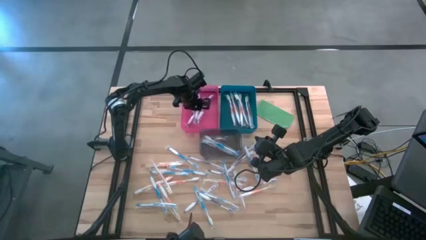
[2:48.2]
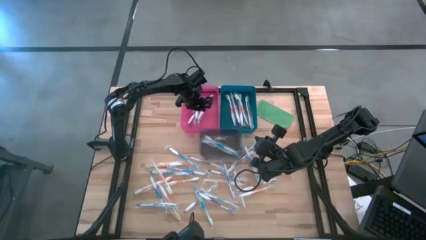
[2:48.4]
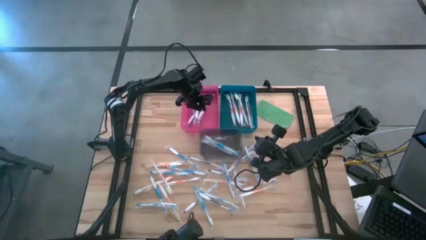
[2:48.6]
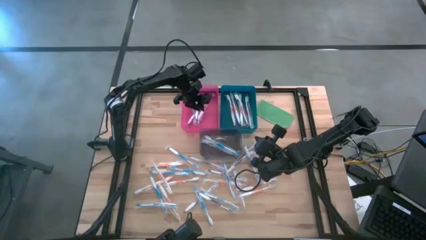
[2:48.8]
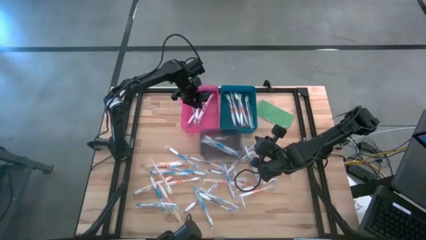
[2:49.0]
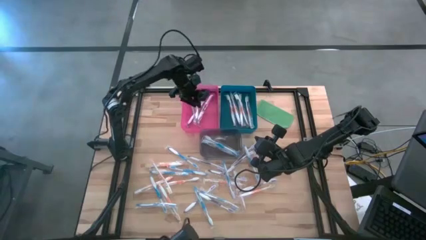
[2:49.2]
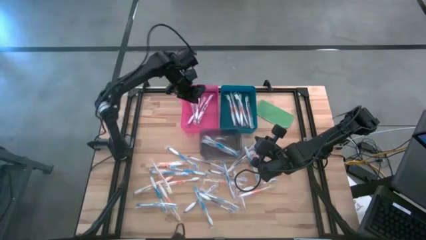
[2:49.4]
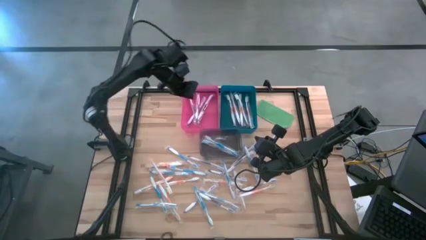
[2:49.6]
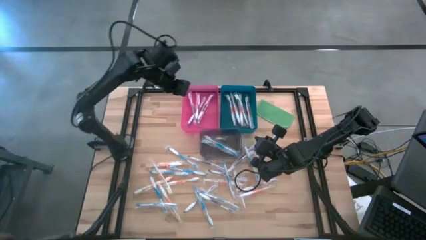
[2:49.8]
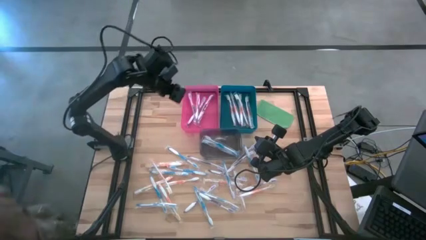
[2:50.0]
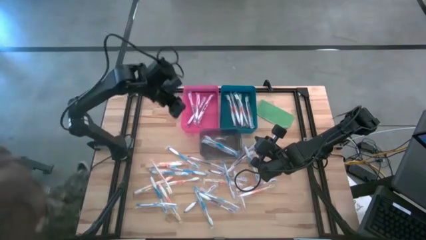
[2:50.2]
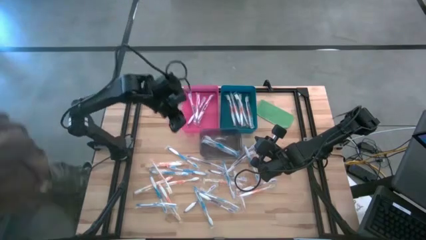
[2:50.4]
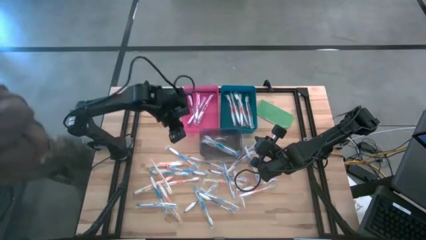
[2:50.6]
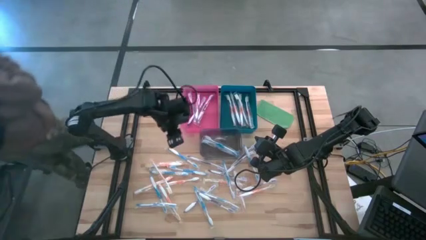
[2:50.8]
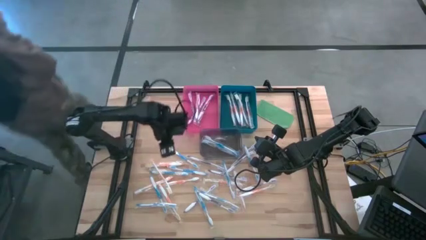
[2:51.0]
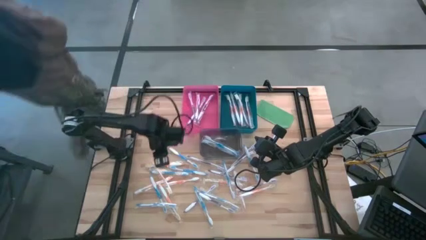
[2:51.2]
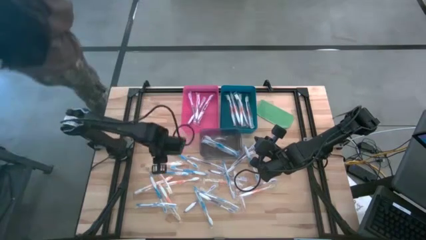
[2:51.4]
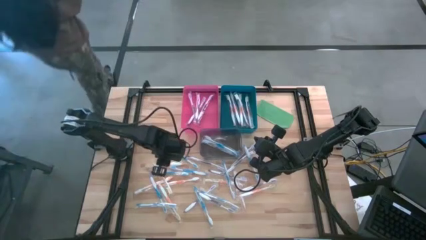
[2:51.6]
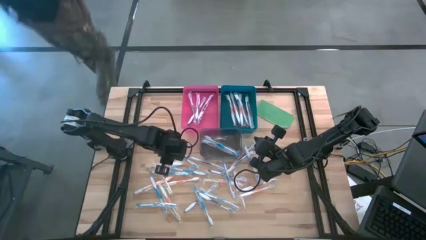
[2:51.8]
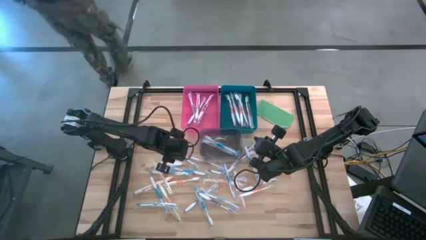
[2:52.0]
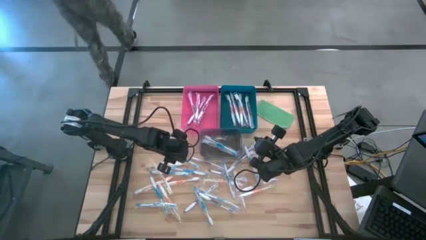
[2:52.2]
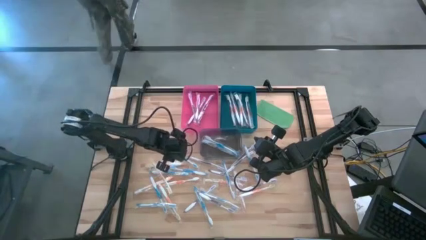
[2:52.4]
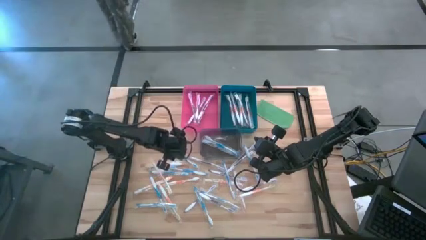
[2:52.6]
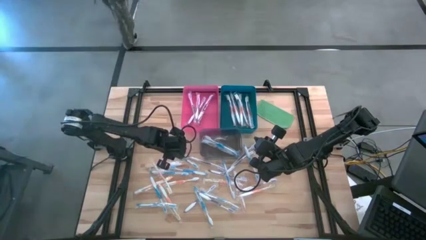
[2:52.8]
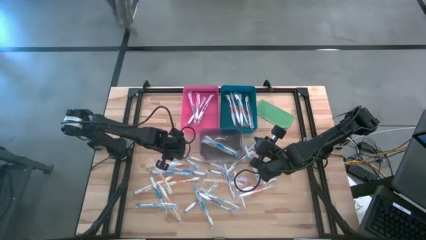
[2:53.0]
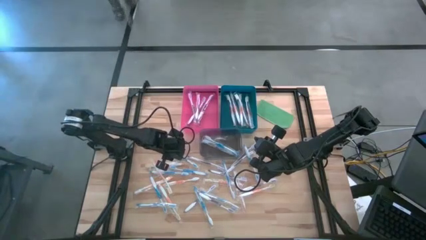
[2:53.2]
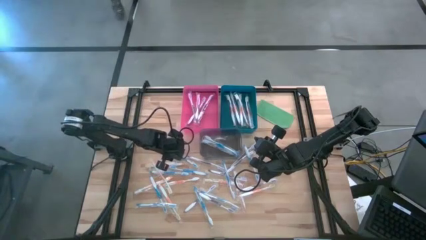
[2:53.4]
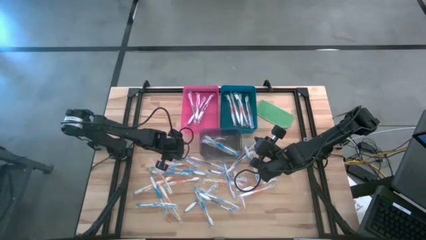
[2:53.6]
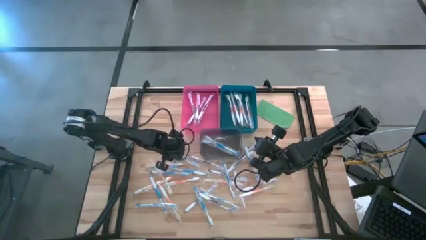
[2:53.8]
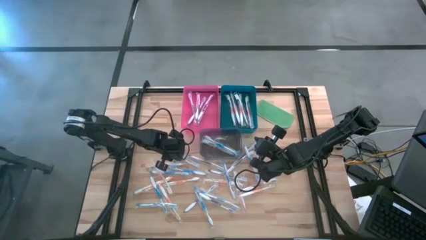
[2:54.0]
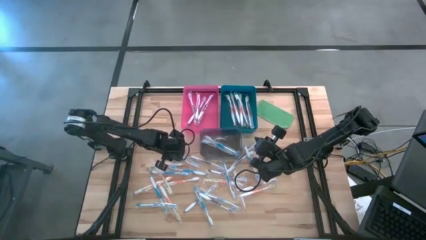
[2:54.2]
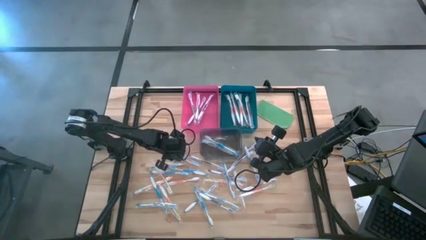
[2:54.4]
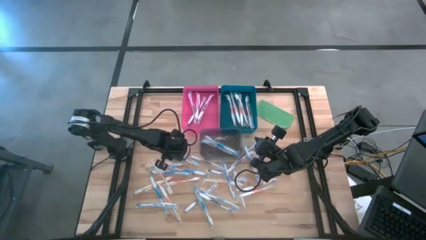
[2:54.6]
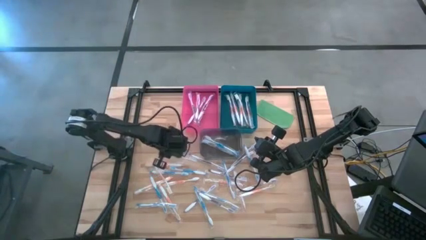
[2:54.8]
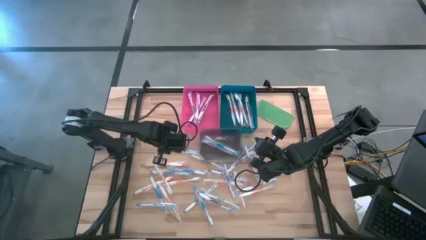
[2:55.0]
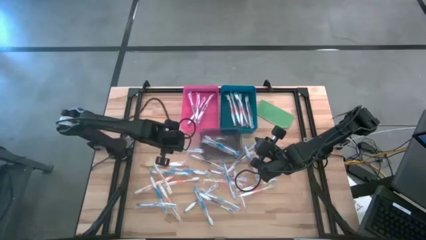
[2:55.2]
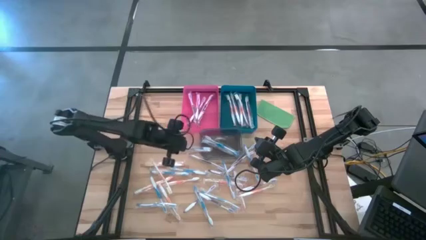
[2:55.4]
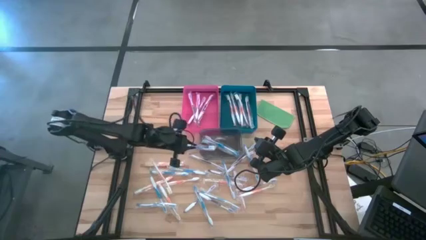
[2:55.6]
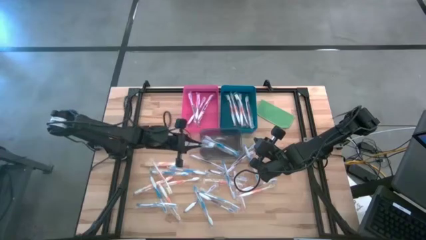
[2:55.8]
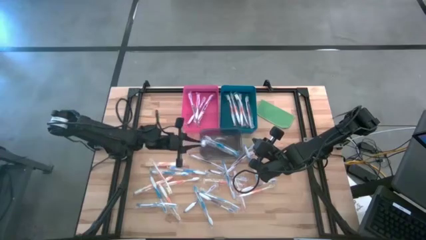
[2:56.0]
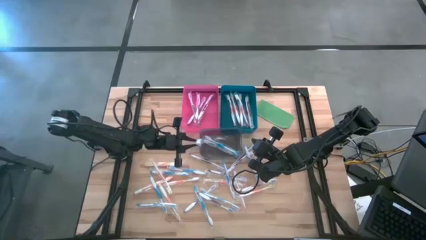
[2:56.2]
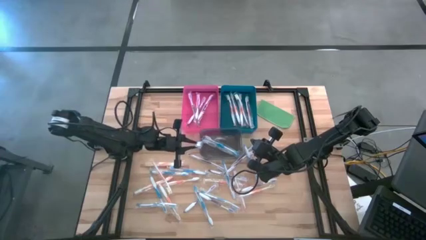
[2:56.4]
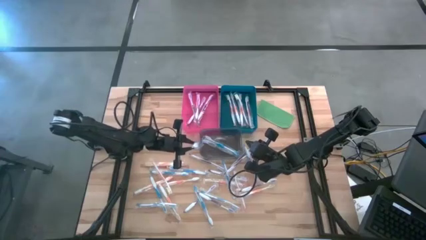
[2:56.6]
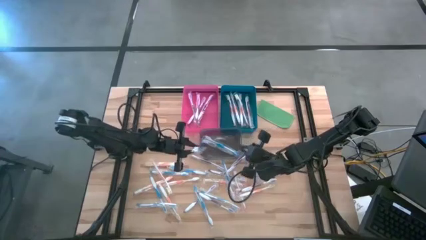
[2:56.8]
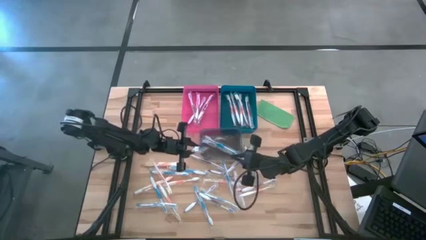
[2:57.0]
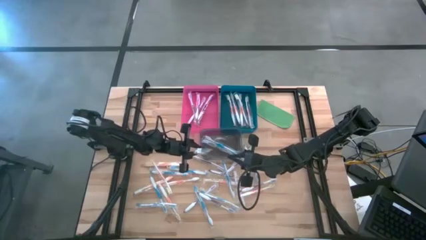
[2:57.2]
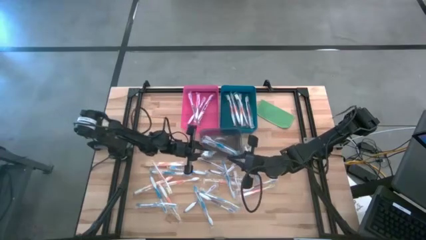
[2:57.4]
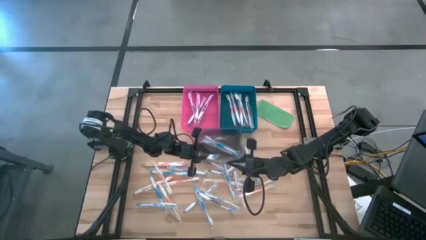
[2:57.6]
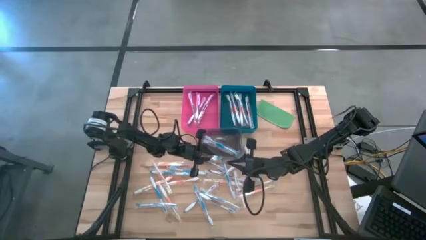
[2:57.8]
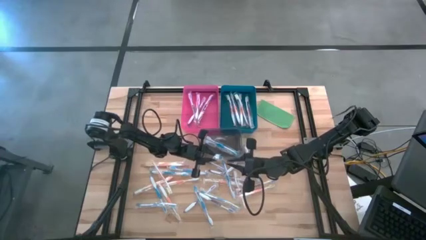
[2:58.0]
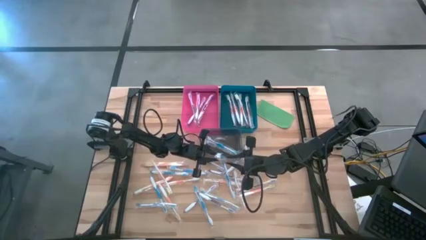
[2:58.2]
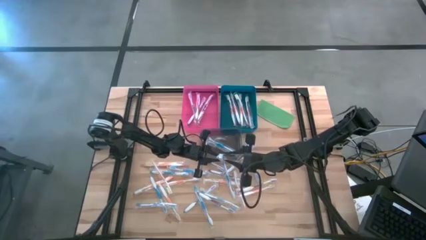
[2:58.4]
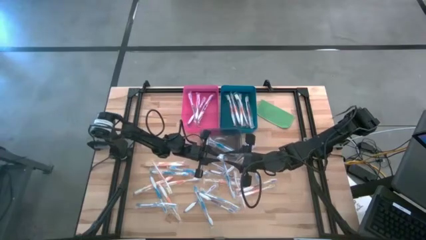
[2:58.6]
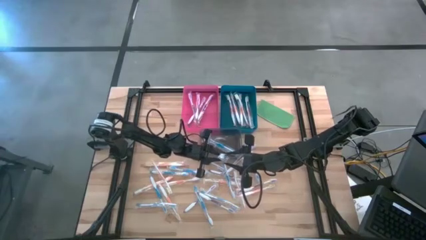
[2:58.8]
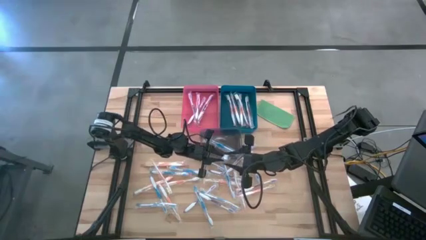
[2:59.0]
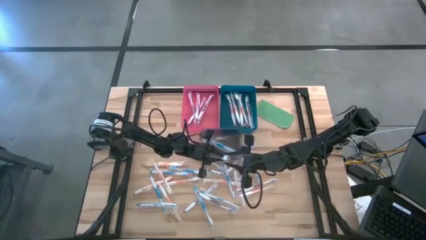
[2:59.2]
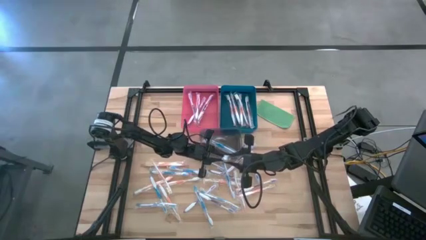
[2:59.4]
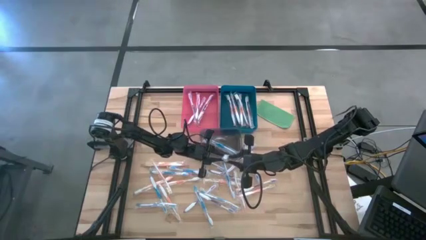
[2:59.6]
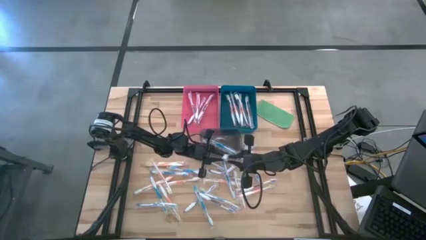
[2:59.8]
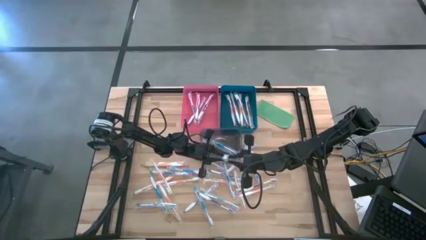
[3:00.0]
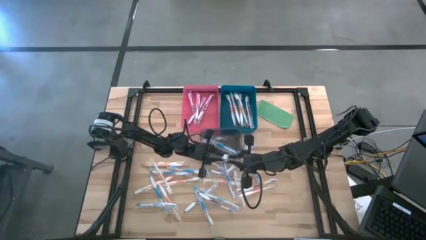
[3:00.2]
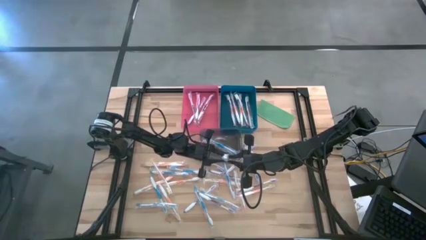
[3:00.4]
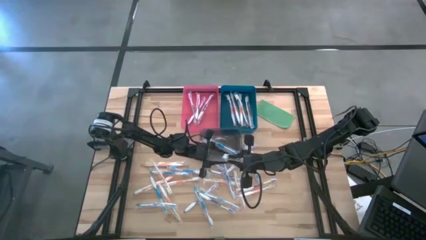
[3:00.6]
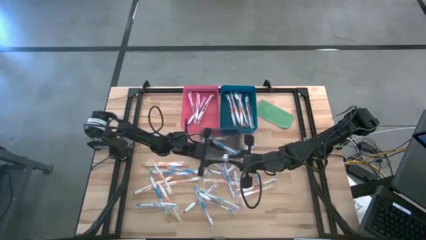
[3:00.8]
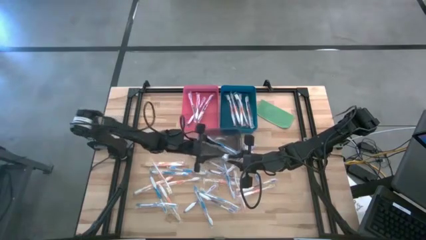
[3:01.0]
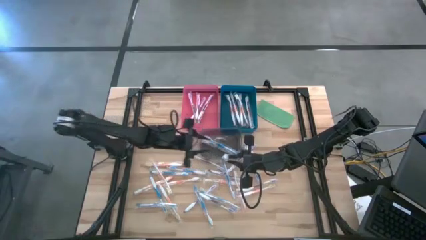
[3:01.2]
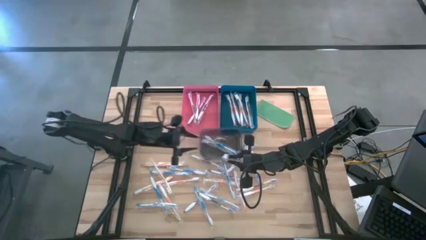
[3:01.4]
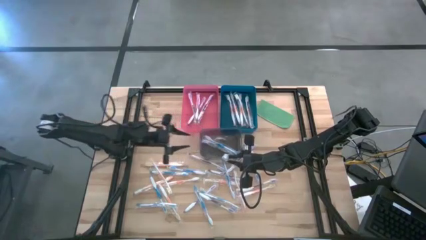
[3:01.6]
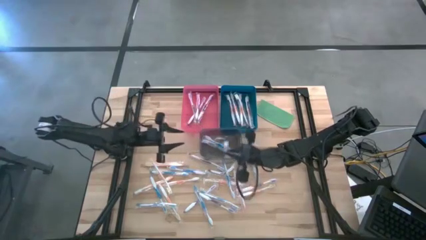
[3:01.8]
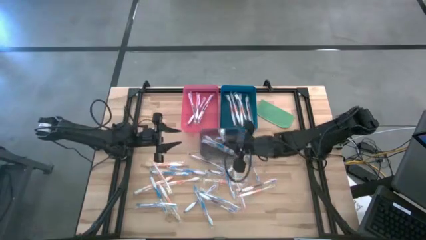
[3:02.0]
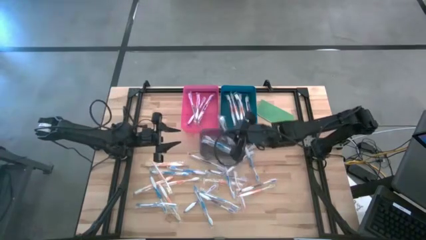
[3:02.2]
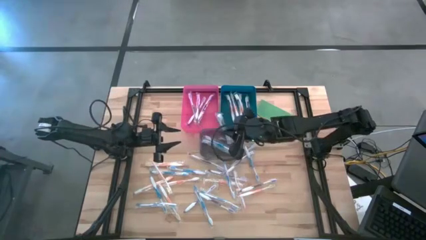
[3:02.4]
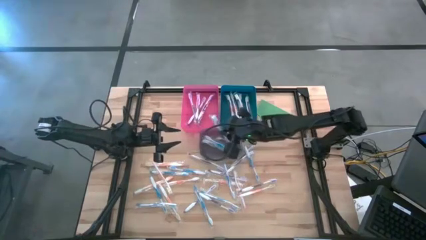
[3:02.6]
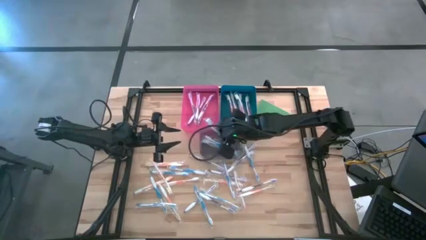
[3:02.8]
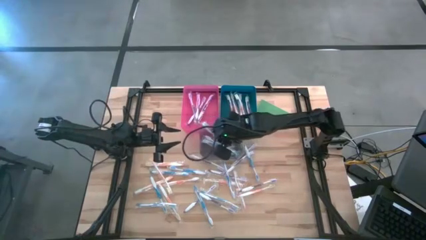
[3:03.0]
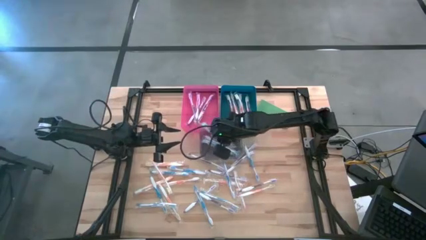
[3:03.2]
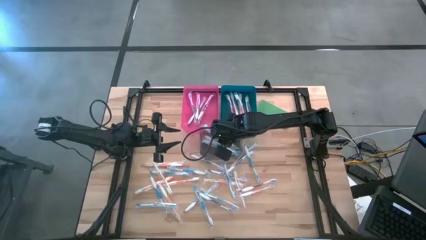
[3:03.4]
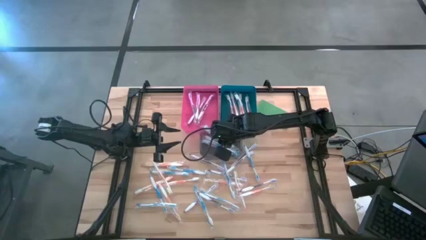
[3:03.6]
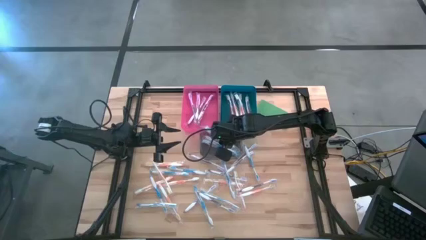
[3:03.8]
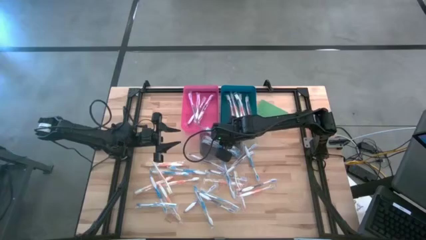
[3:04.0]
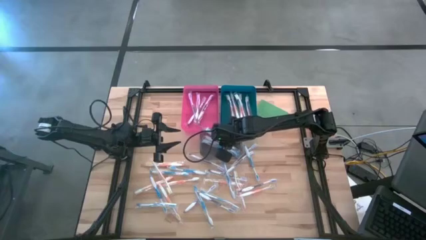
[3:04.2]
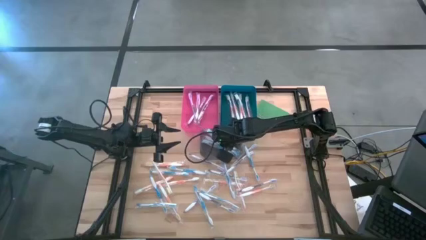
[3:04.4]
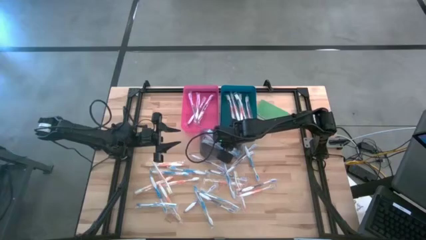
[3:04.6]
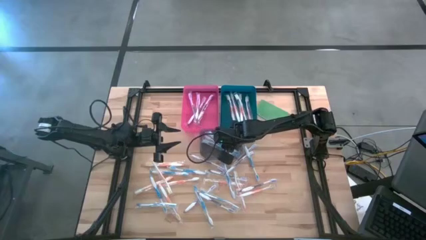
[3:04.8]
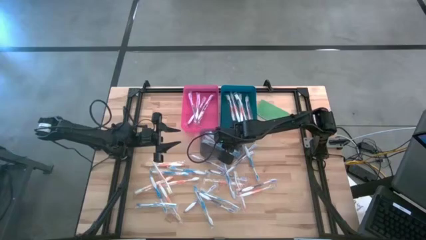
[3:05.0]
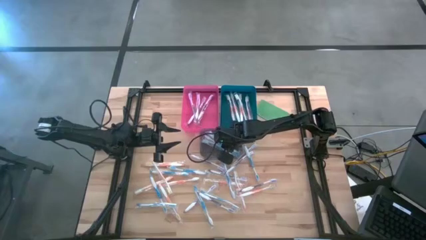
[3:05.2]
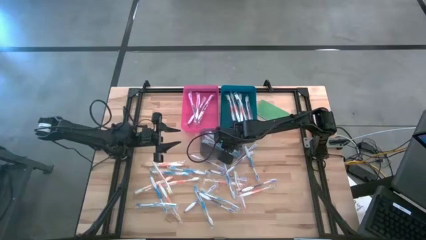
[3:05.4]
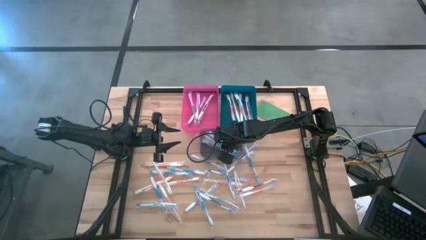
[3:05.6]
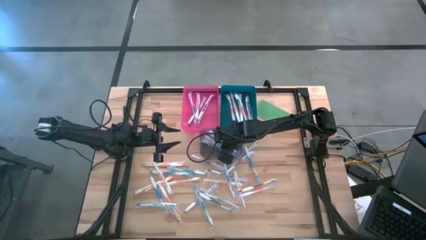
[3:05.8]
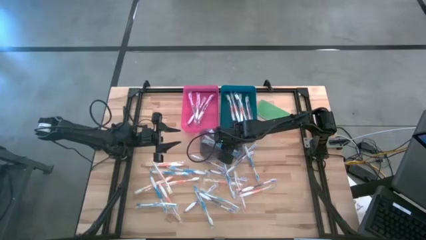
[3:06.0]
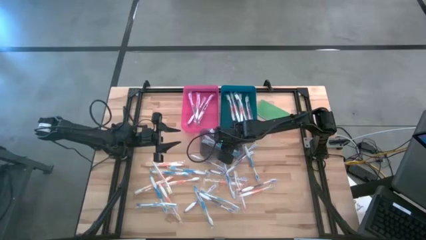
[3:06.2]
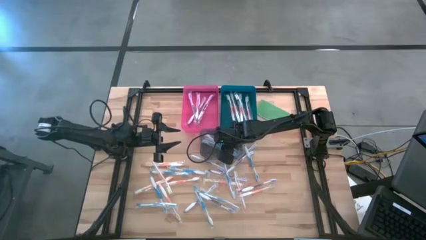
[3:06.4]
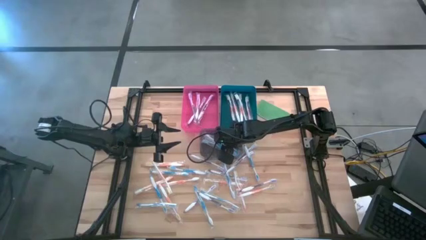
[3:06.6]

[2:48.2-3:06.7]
Task: Pick & Place Toothbrushes
Put the blue toothbrush into the transparent gray bin
